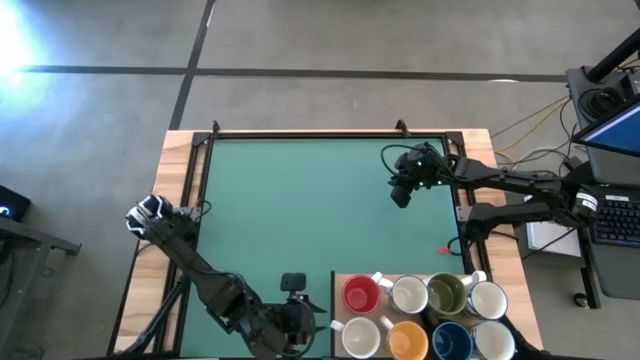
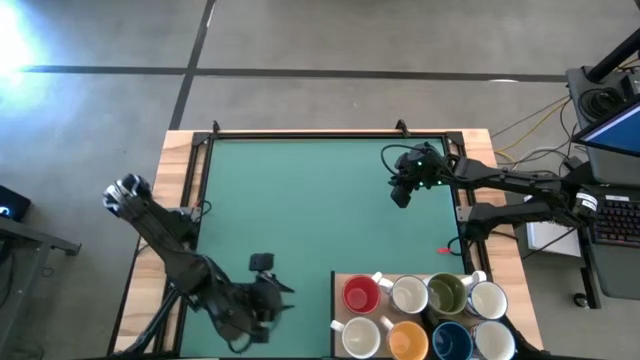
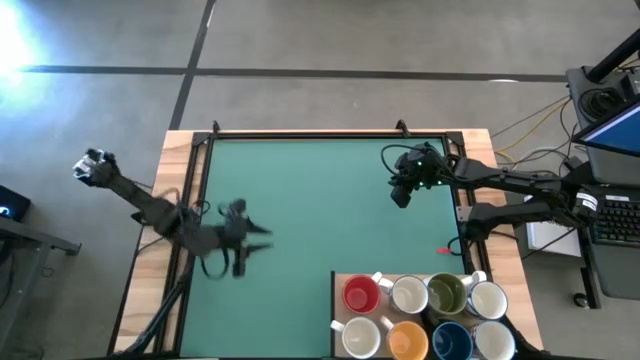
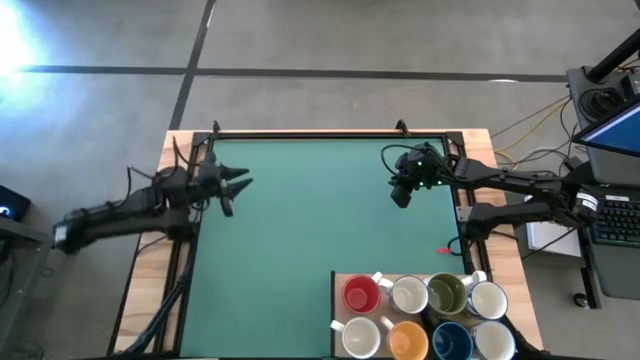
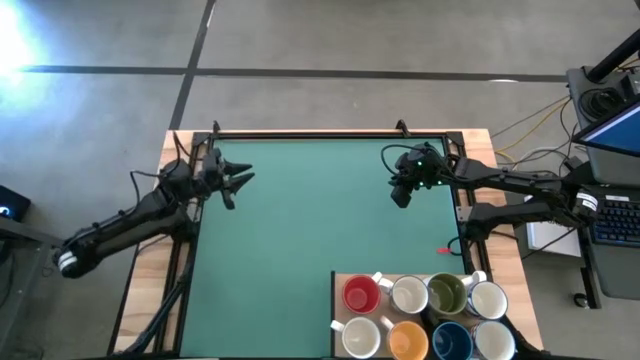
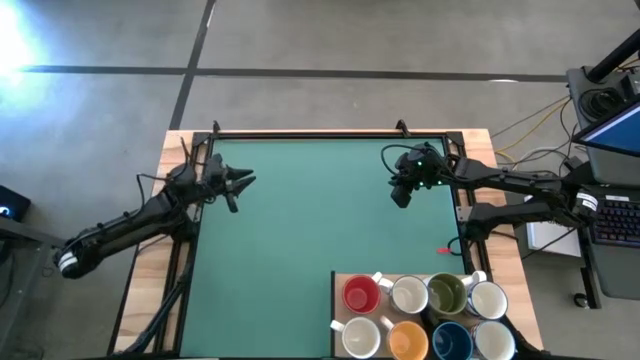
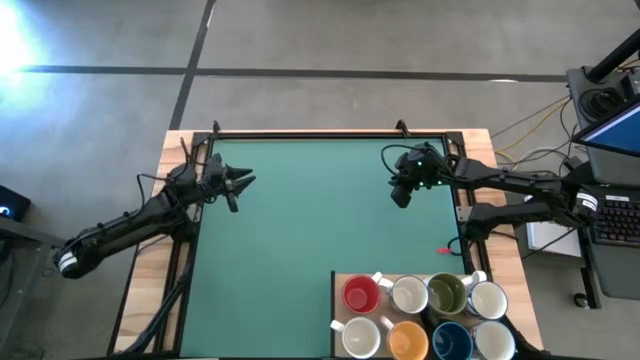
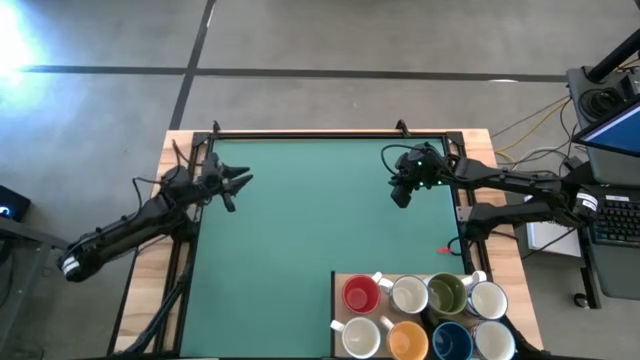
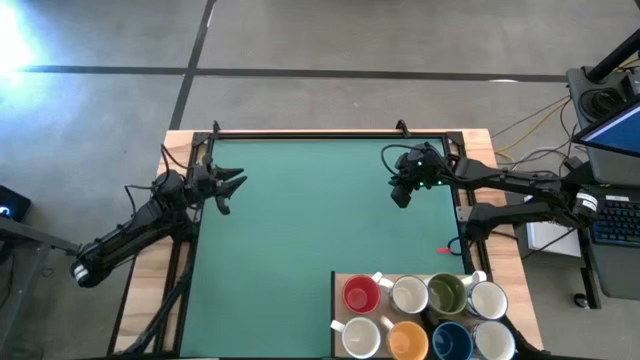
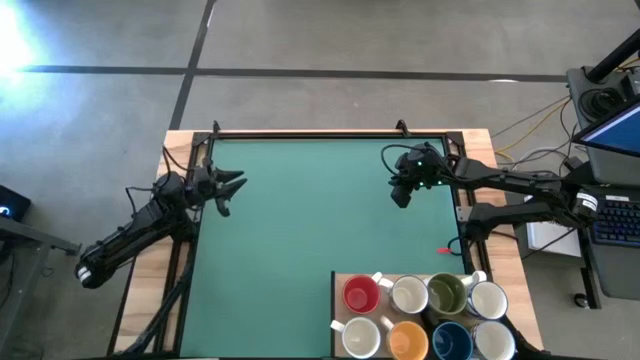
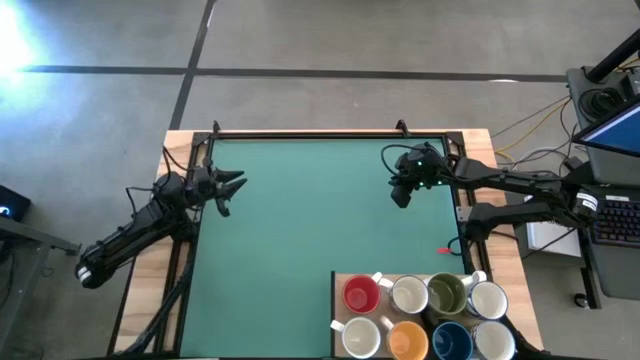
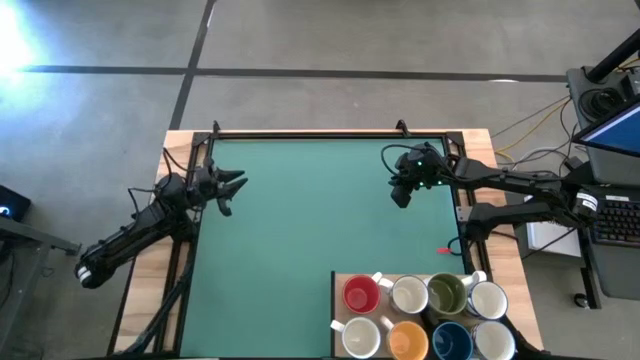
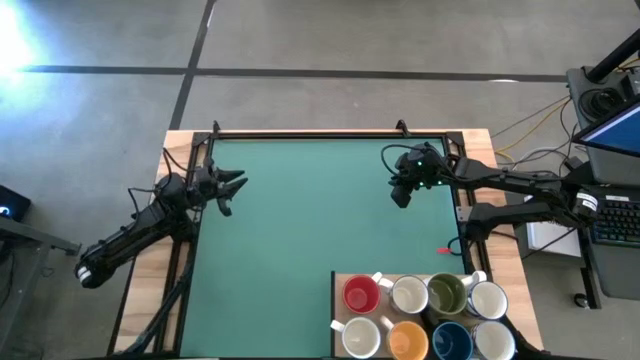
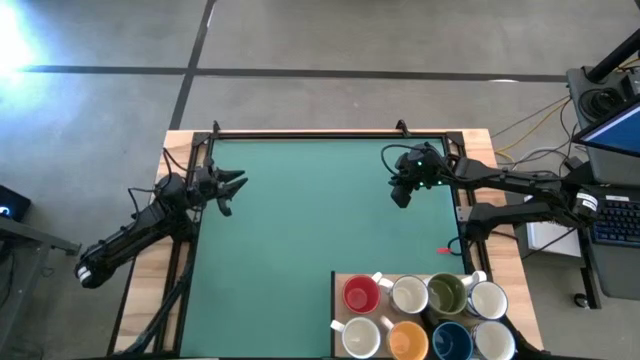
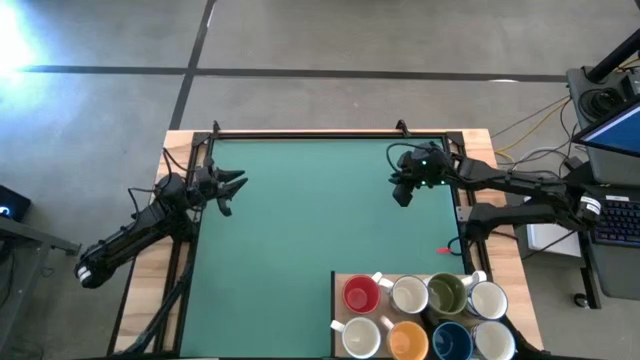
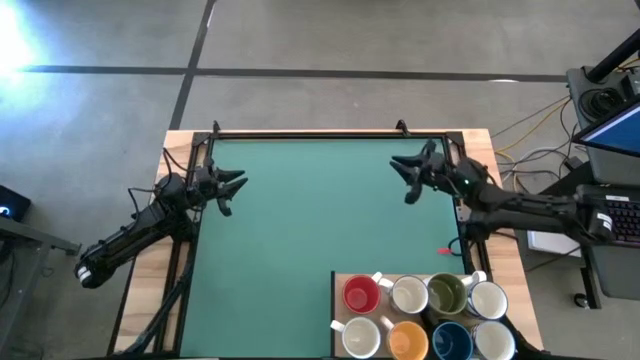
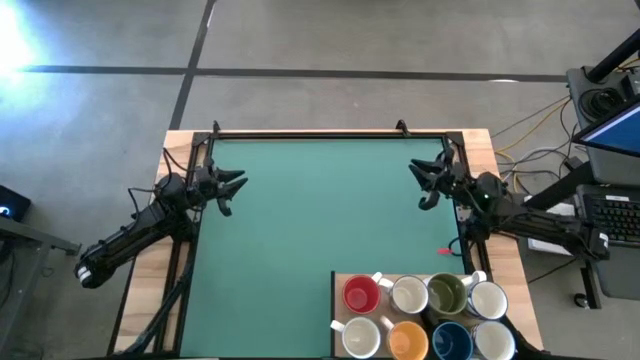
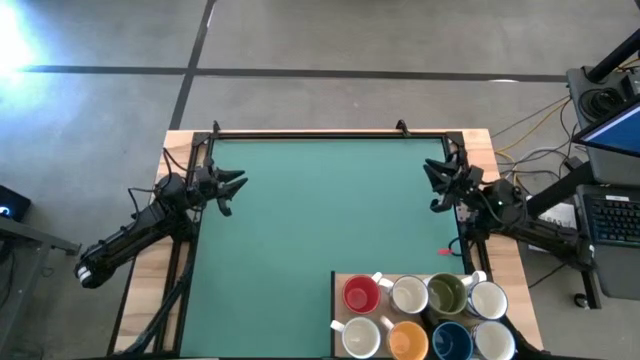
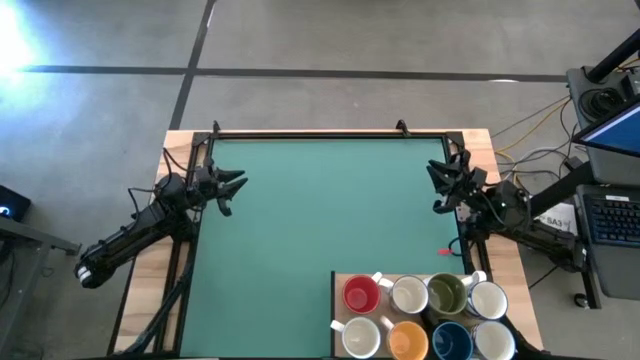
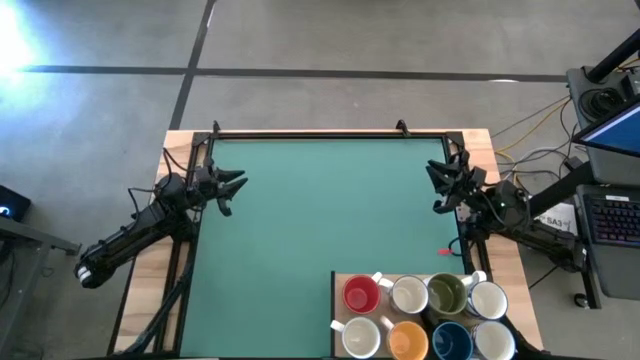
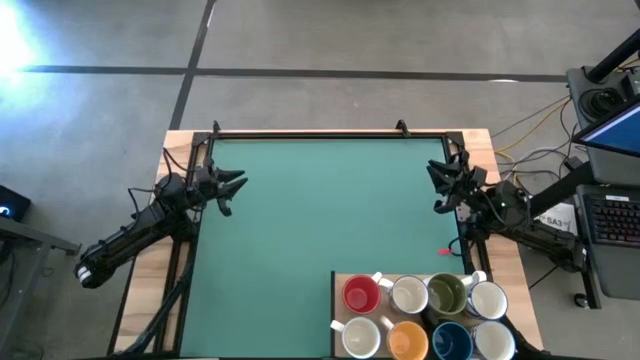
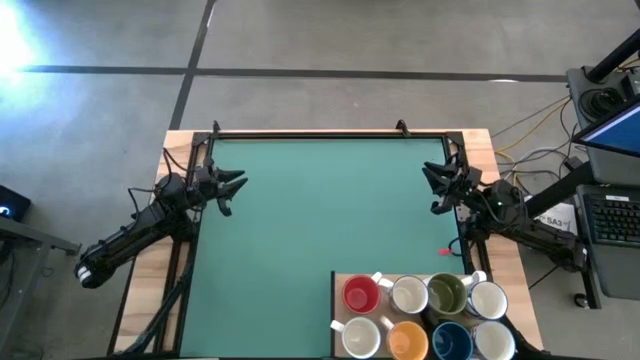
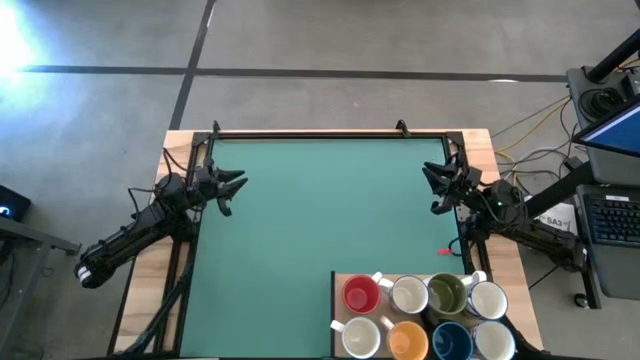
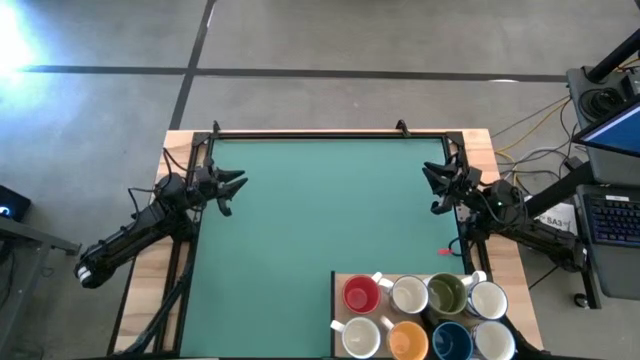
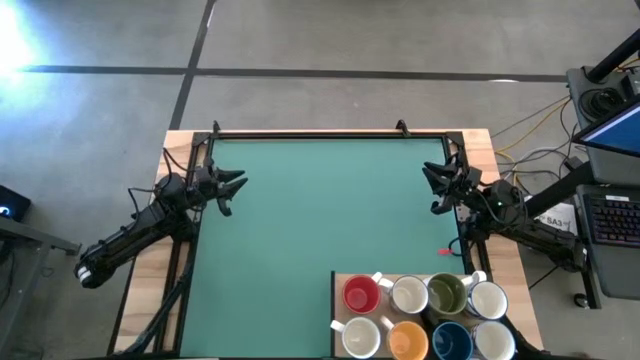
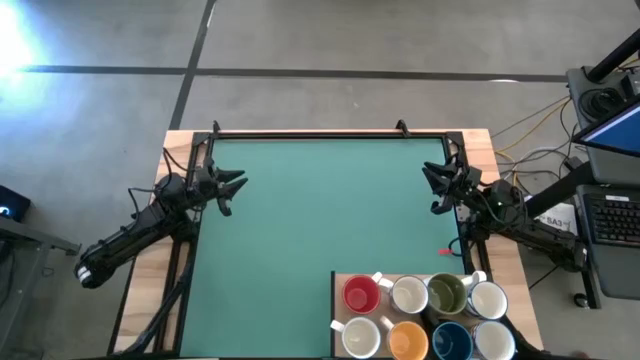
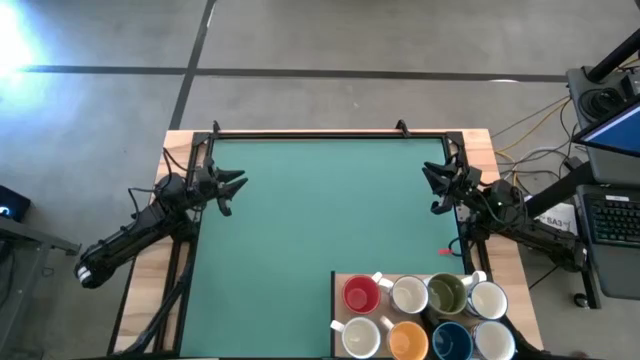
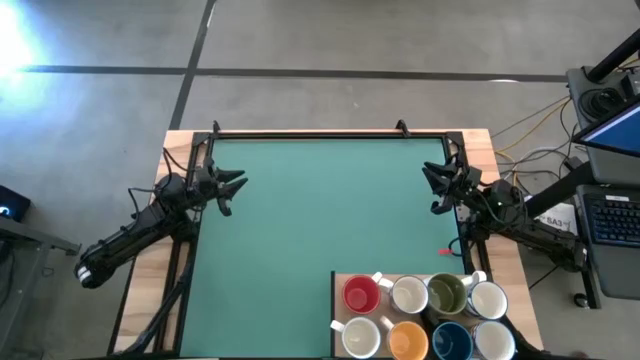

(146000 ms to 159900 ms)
Task: Place coffee mugs
Return to Home Position

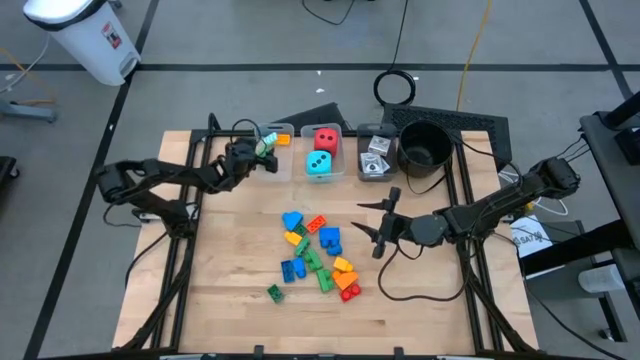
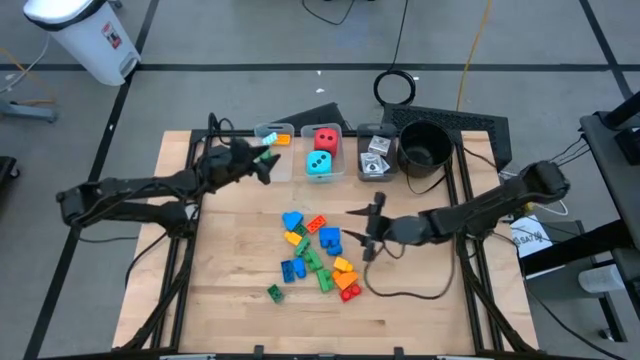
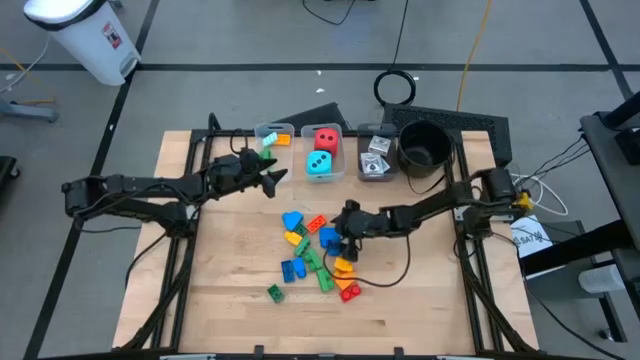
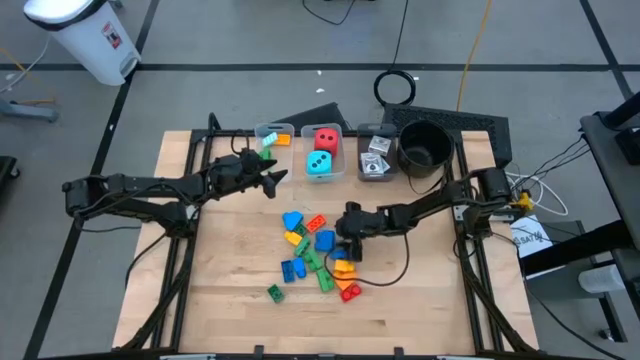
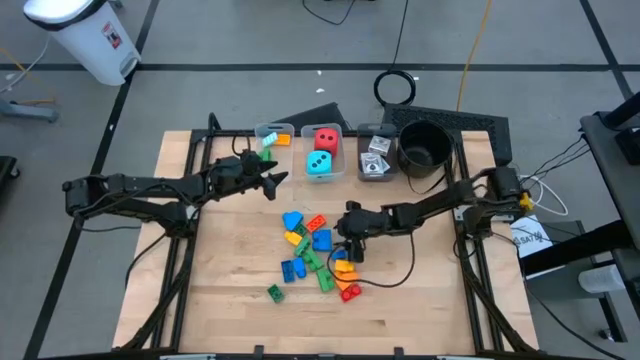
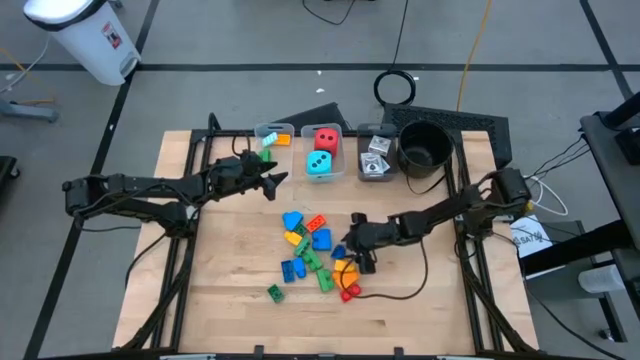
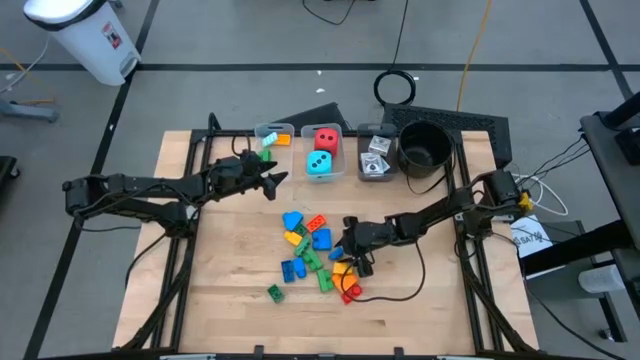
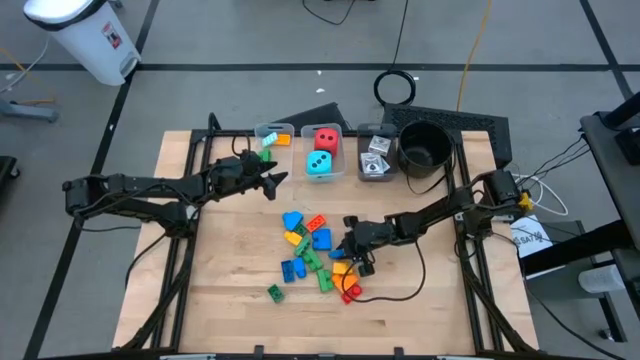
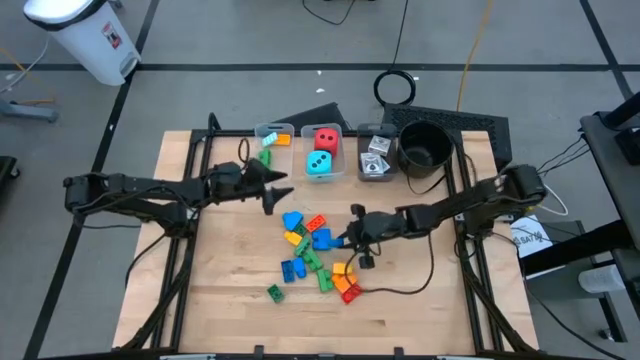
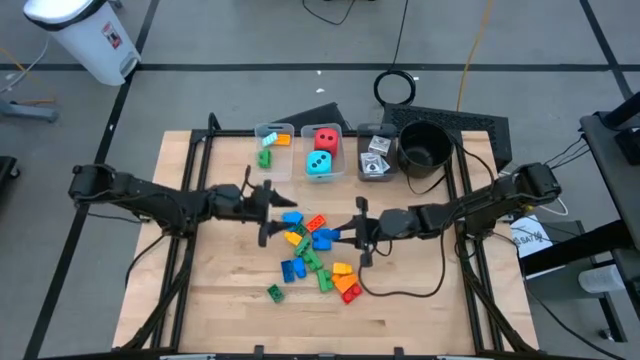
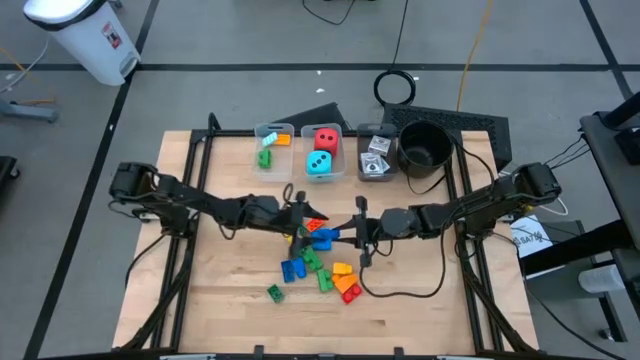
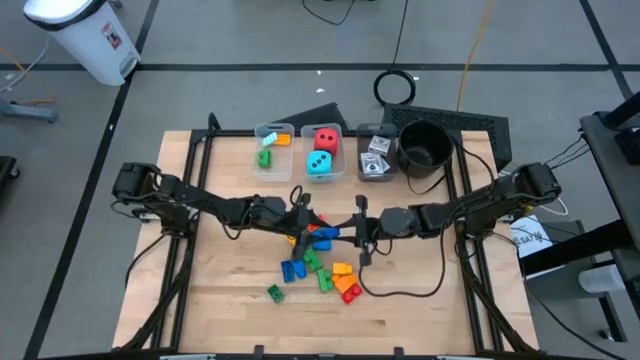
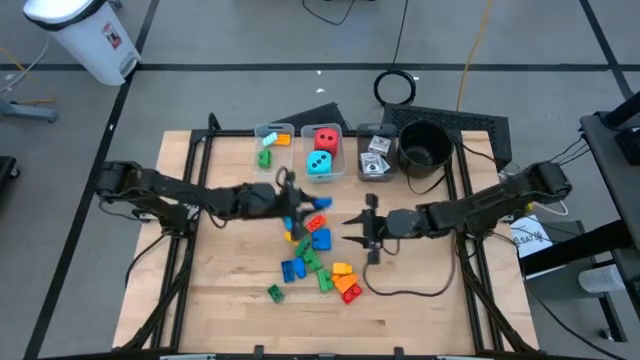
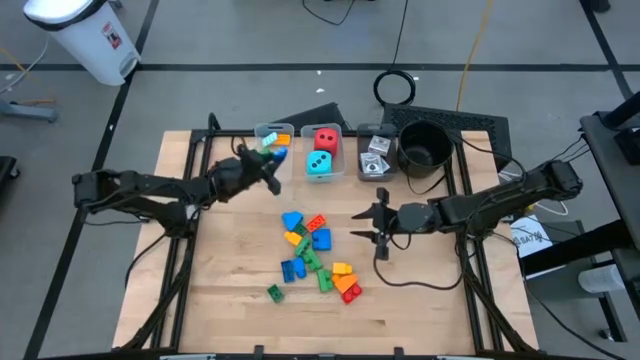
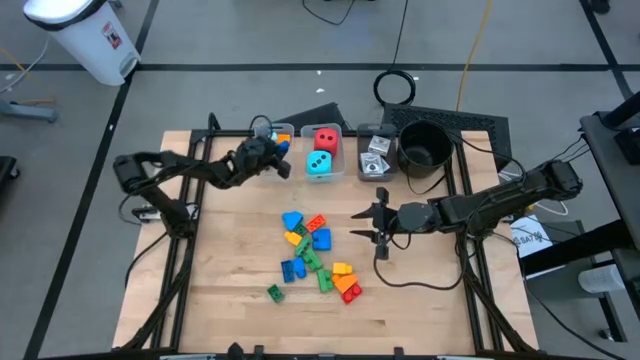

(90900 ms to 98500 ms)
Task: Pick & Place Toys
Put the blue game piece into the left transparent bin
